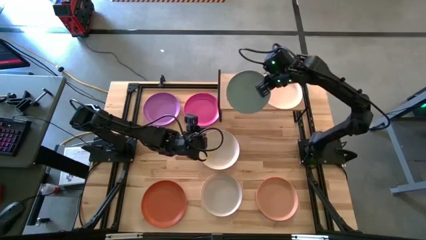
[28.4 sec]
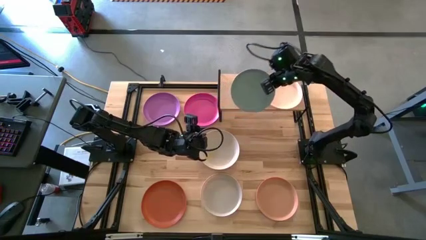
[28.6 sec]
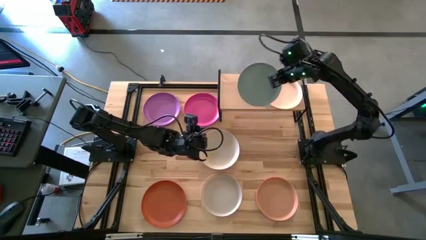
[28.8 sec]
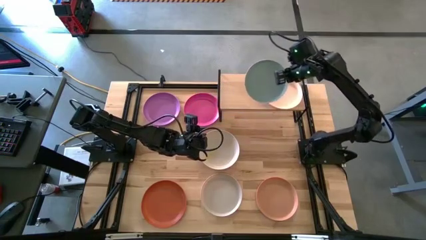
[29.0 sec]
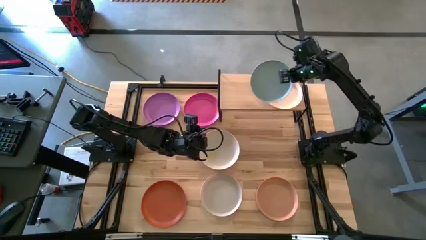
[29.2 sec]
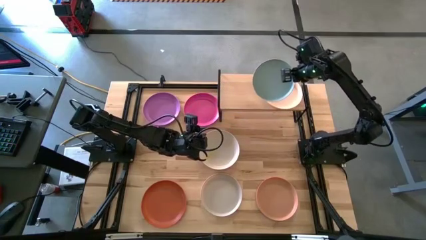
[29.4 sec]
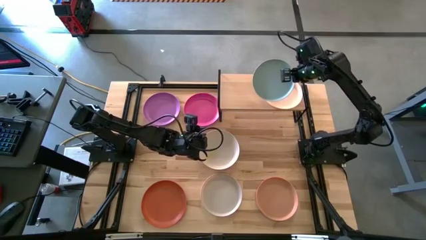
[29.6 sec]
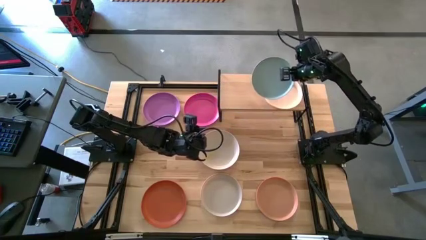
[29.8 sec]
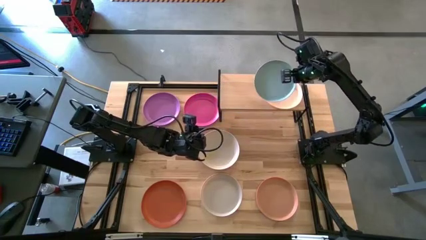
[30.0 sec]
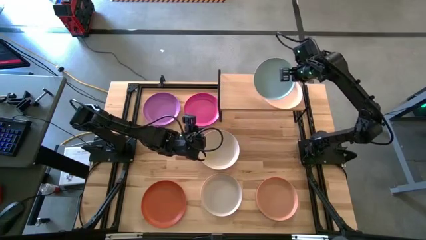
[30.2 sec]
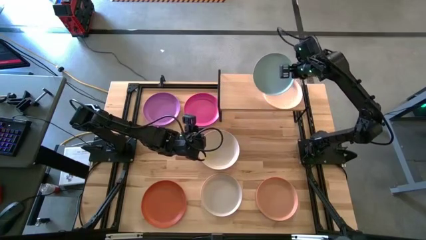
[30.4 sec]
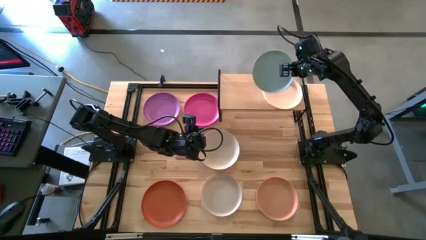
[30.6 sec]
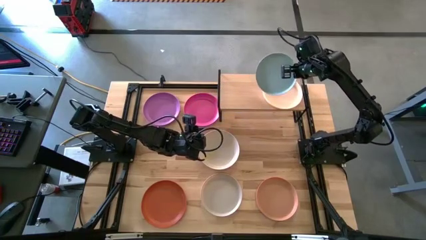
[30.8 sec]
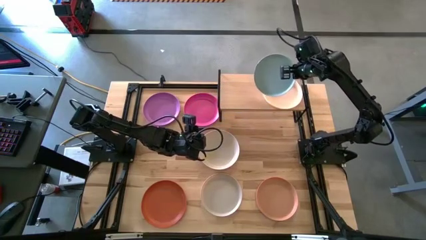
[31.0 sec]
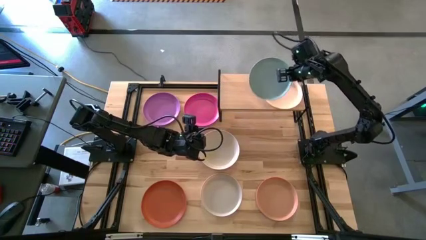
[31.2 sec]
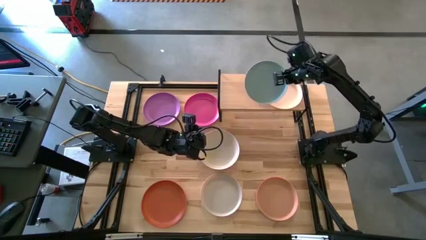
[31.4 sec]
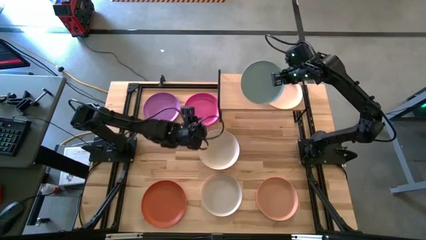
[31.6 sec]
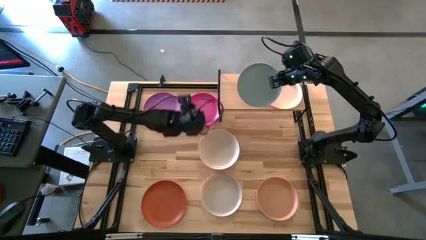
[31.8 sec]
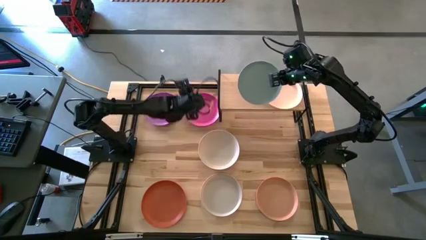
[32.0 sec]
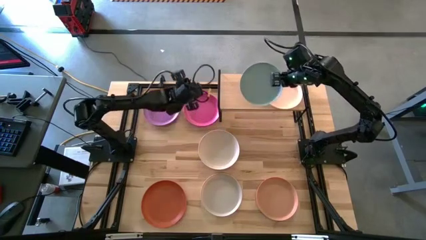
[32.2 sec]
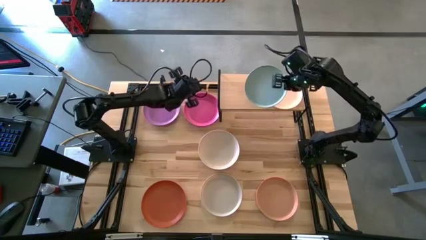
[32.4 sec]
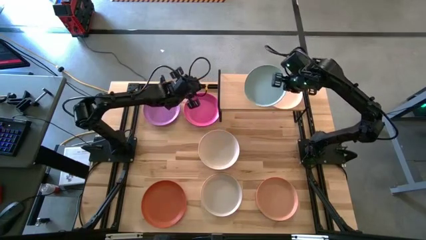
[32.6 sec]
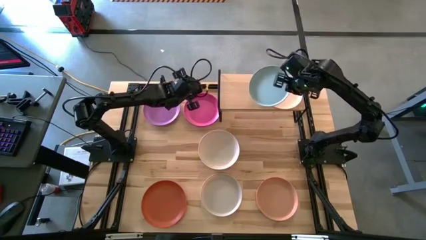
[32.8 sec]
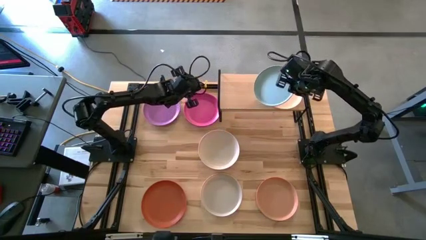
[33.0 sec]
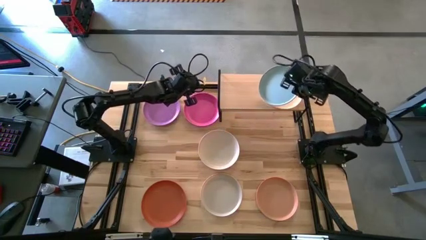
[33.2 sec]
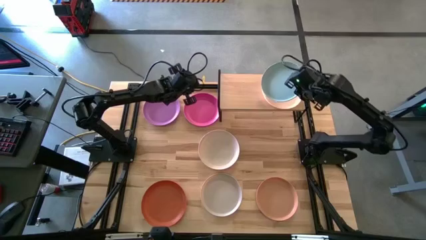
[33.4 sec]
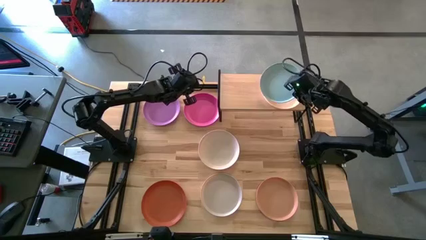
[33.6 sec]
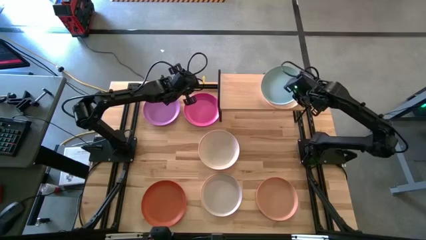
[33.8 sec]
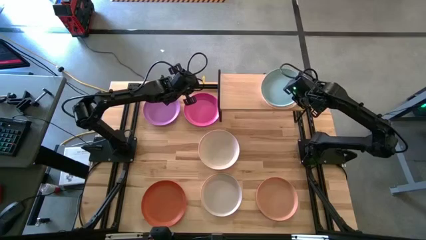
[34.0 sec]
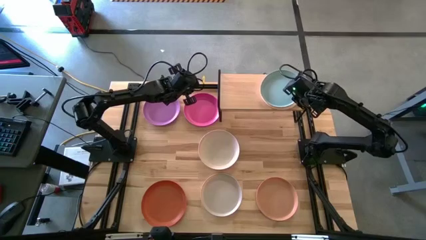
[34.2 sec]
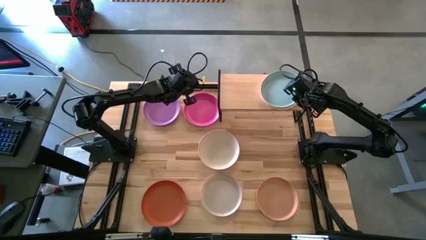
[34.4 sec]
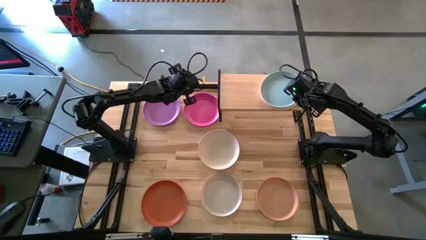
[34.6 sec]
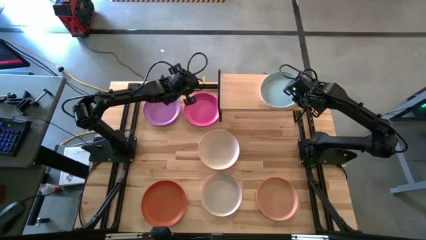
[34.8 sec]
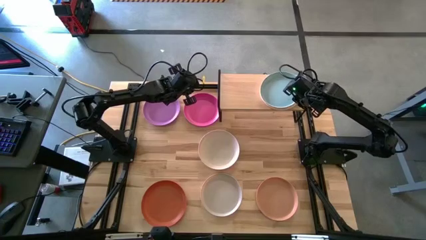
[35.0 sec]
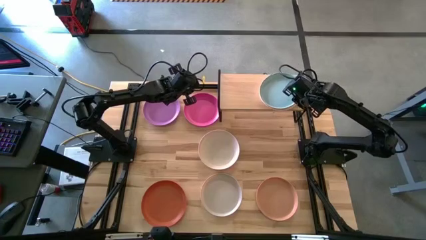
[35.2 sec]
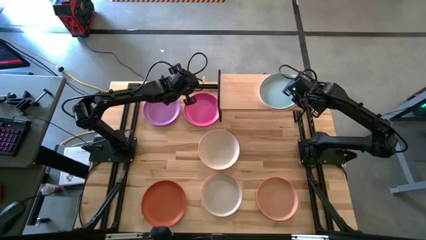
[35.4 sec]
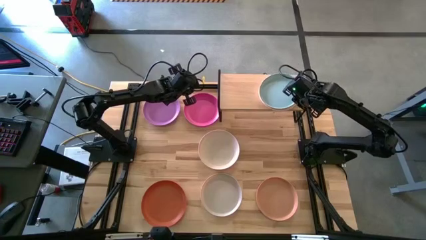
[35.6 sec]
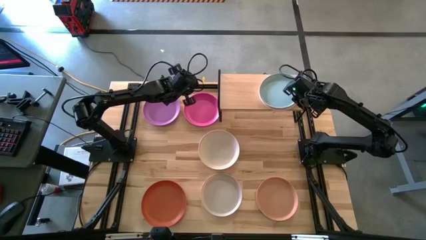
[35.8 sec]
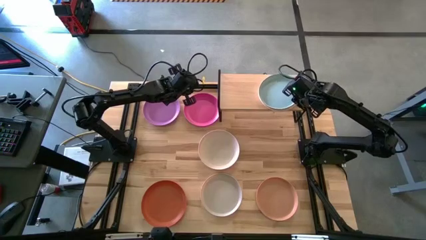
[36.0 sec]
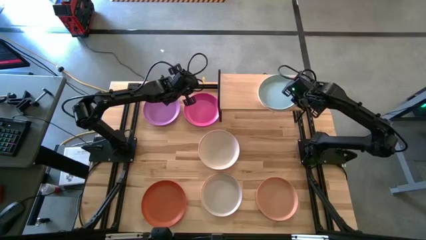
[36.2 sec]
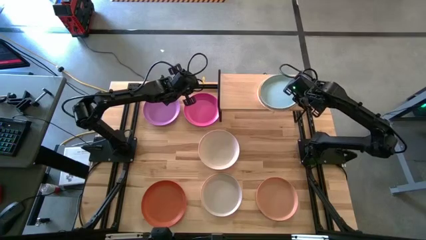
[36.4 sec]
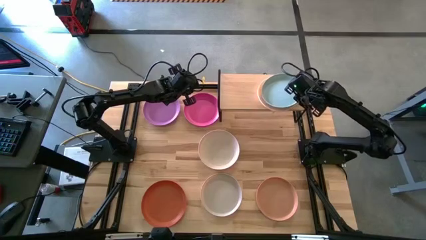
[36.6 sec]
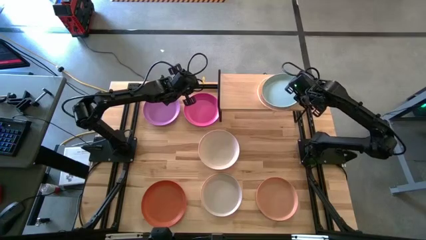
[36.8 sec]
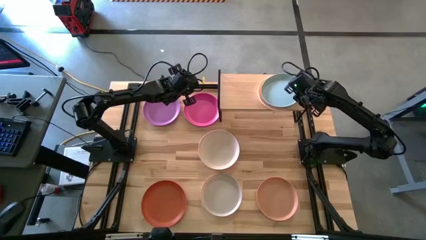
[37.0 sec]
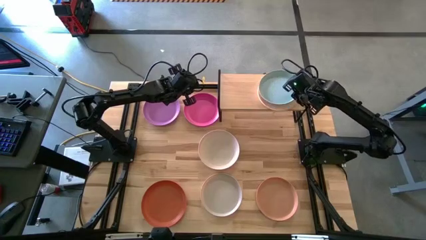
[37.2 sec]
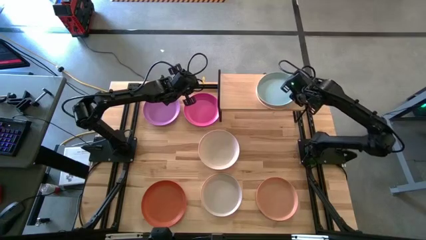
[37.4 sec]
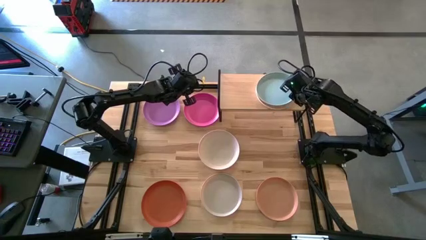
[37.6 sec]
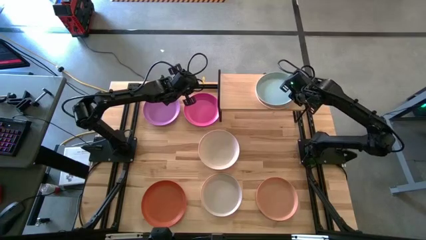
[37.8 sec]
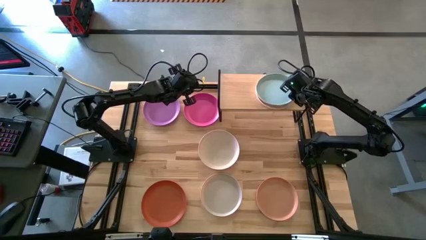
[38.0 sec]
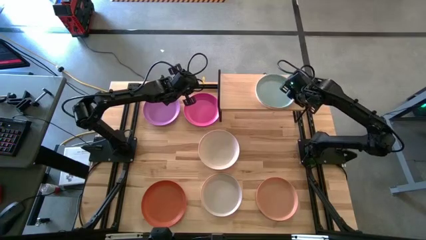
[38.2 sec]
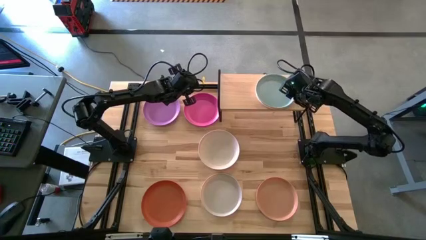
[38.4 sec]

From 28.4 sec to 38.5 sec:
Task: Place and stack plates onto a shelf
Stack the blue plate on top of the white plate
